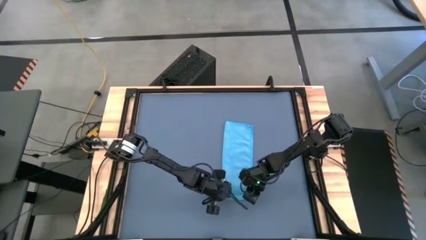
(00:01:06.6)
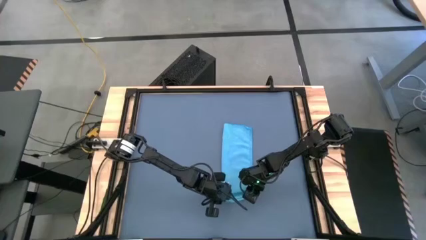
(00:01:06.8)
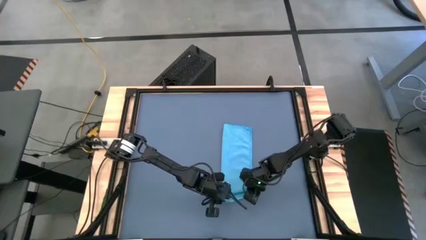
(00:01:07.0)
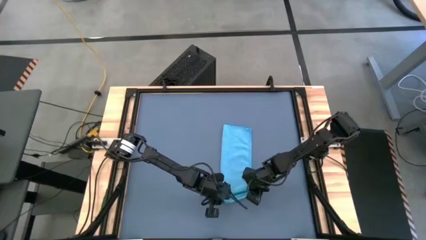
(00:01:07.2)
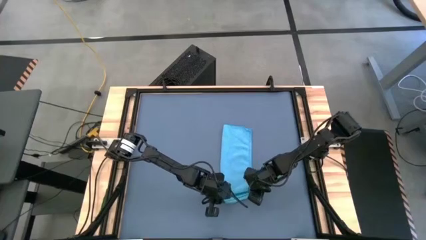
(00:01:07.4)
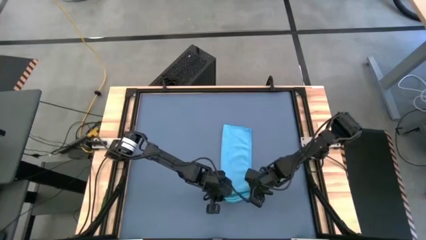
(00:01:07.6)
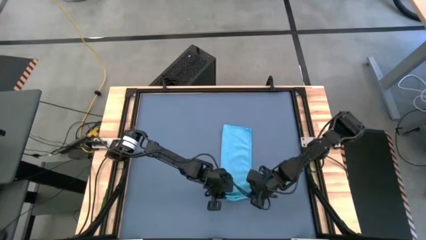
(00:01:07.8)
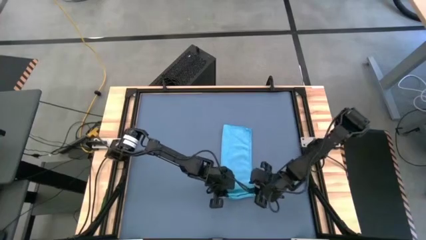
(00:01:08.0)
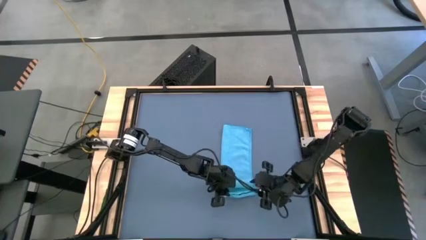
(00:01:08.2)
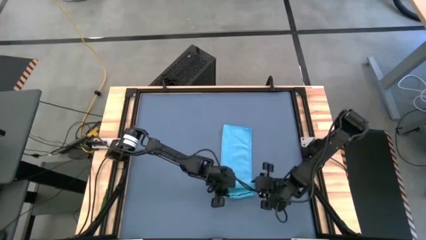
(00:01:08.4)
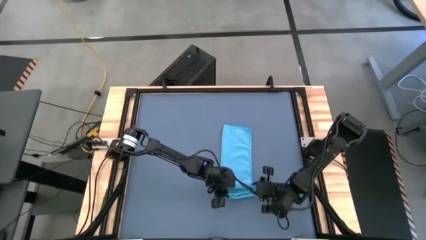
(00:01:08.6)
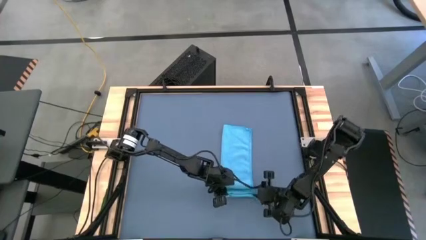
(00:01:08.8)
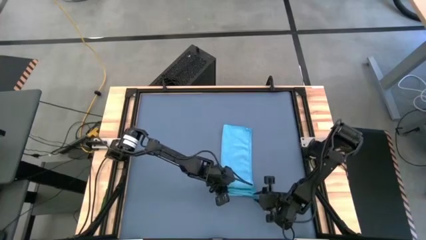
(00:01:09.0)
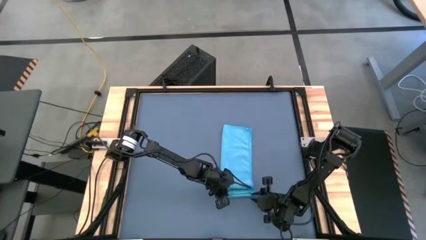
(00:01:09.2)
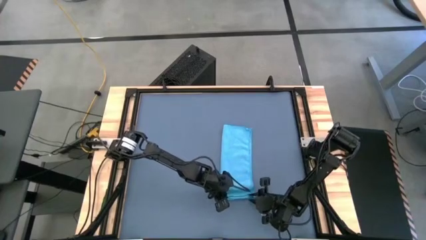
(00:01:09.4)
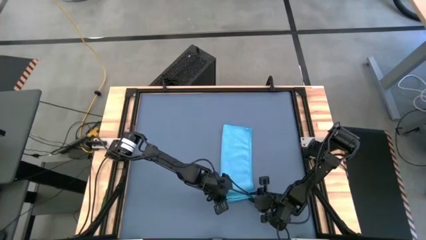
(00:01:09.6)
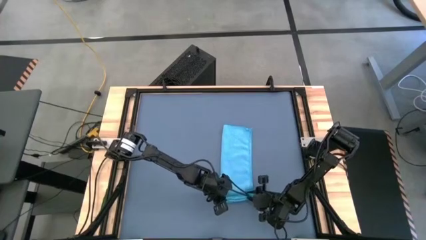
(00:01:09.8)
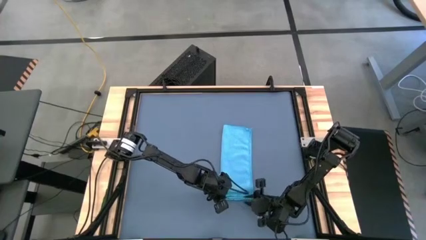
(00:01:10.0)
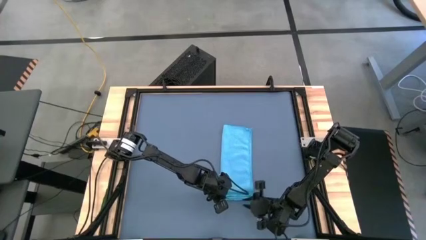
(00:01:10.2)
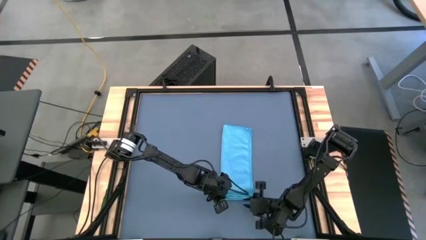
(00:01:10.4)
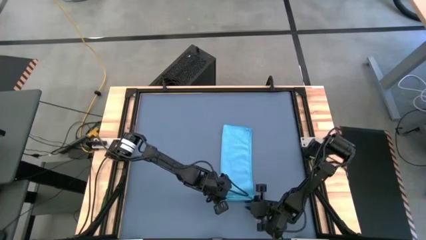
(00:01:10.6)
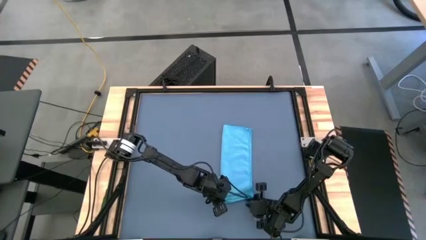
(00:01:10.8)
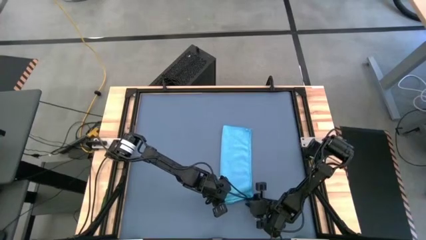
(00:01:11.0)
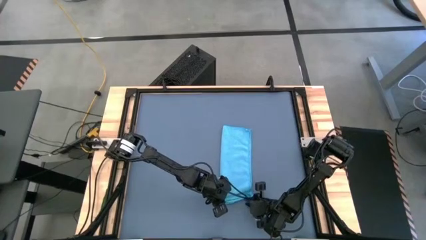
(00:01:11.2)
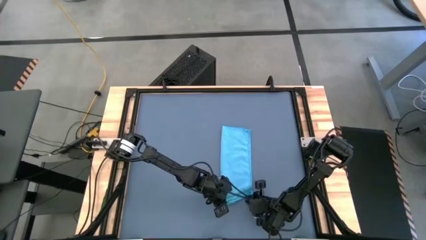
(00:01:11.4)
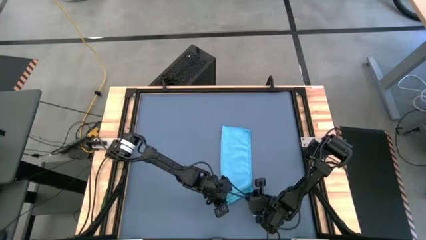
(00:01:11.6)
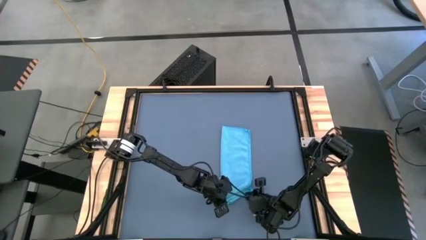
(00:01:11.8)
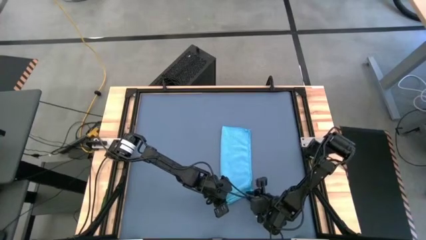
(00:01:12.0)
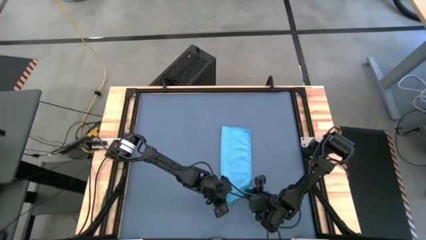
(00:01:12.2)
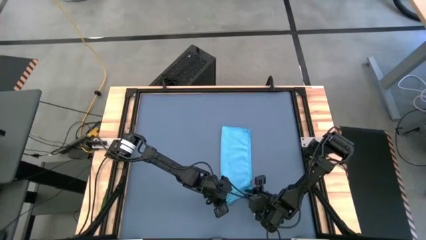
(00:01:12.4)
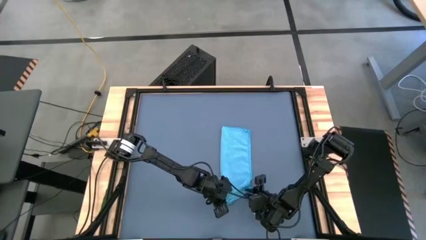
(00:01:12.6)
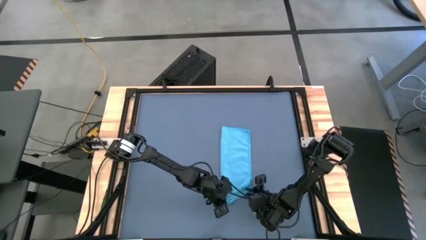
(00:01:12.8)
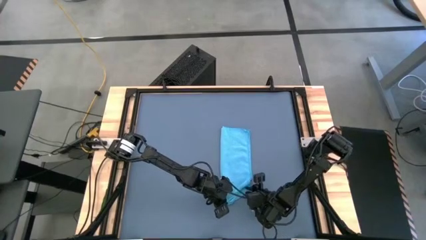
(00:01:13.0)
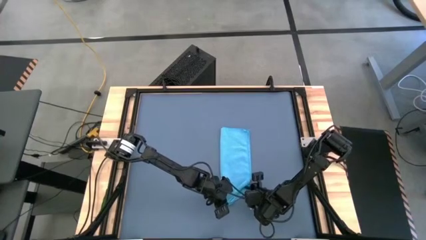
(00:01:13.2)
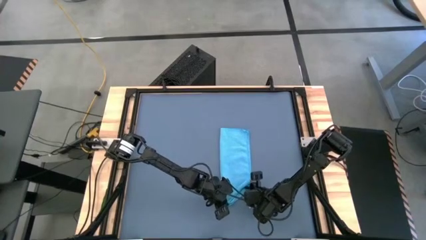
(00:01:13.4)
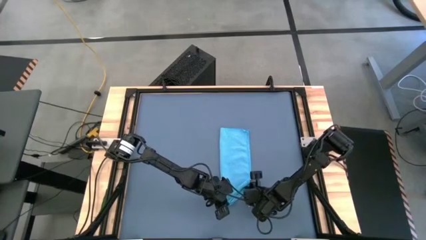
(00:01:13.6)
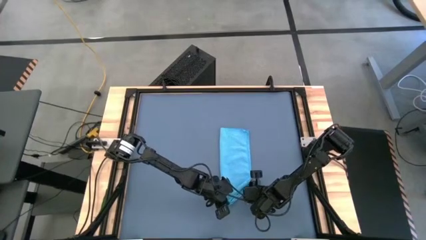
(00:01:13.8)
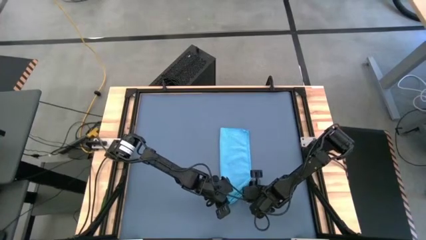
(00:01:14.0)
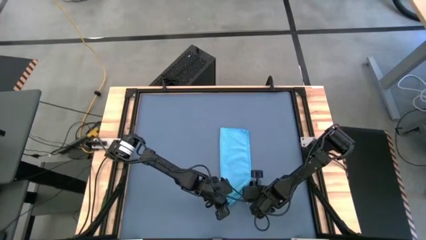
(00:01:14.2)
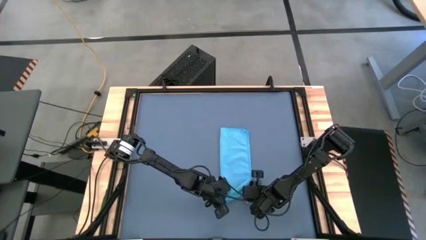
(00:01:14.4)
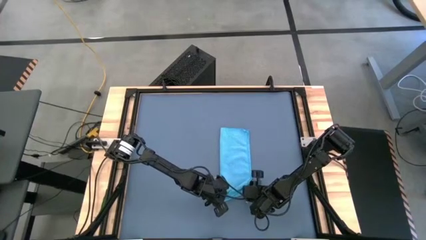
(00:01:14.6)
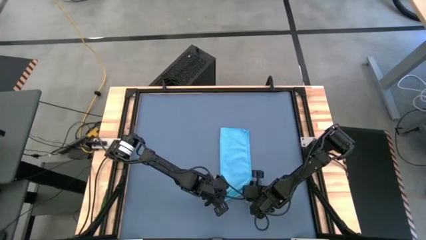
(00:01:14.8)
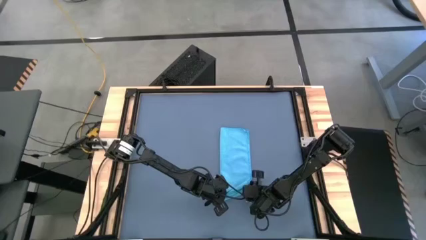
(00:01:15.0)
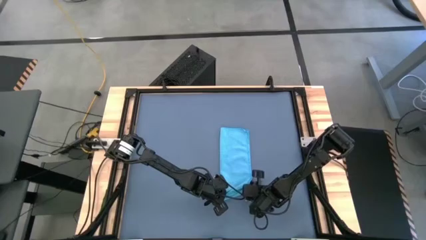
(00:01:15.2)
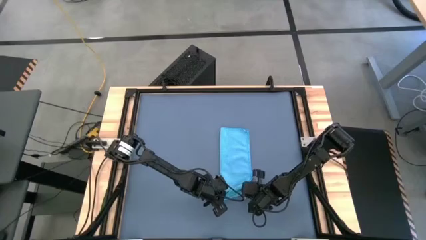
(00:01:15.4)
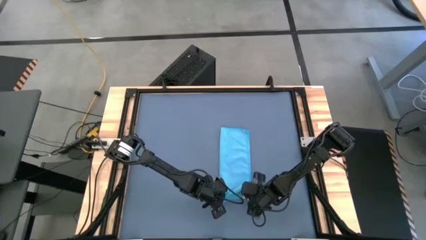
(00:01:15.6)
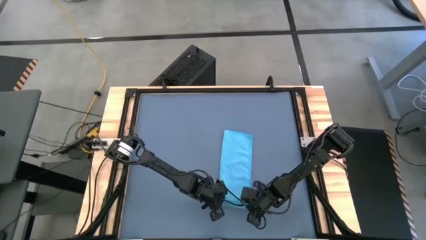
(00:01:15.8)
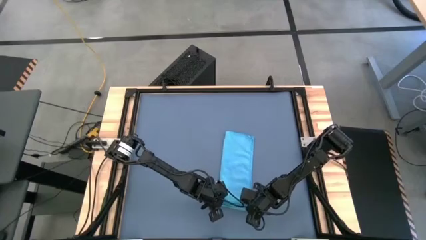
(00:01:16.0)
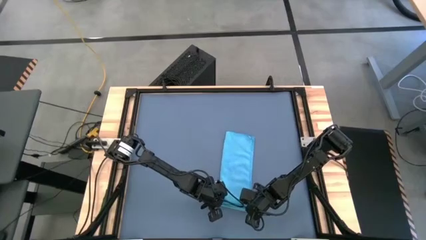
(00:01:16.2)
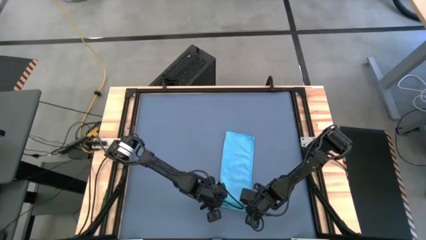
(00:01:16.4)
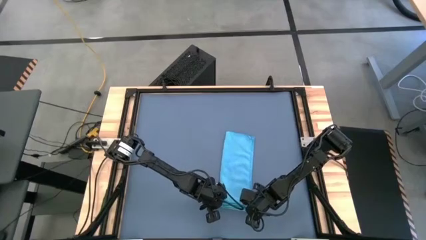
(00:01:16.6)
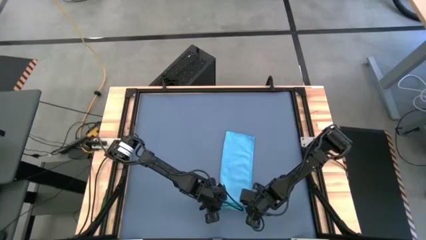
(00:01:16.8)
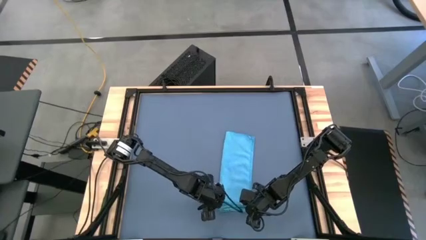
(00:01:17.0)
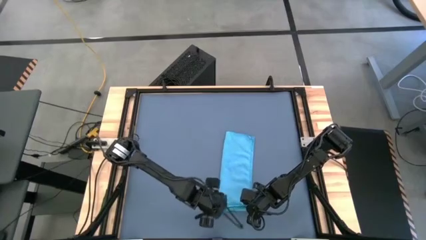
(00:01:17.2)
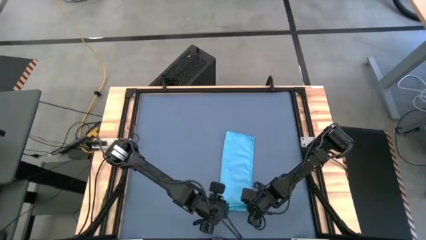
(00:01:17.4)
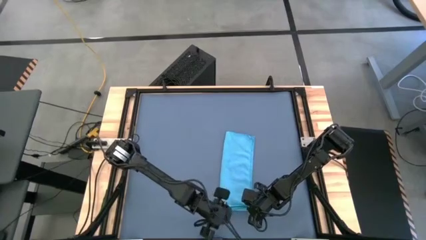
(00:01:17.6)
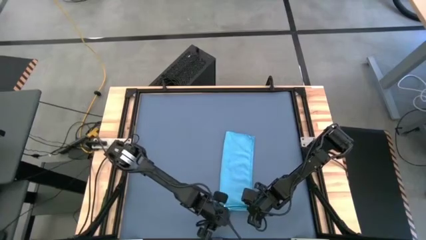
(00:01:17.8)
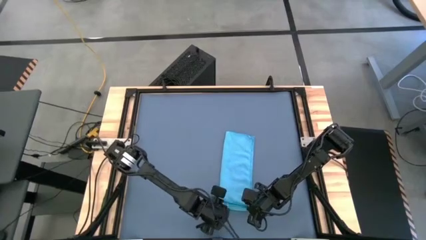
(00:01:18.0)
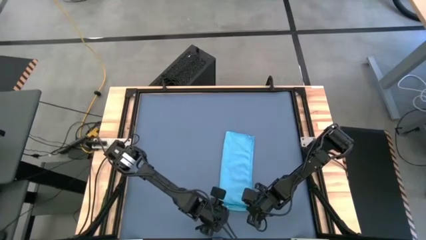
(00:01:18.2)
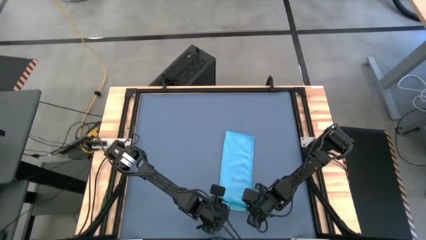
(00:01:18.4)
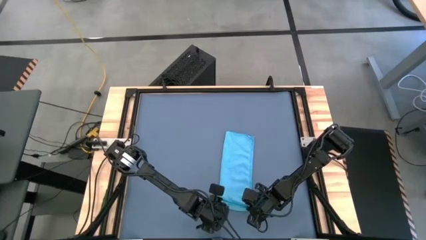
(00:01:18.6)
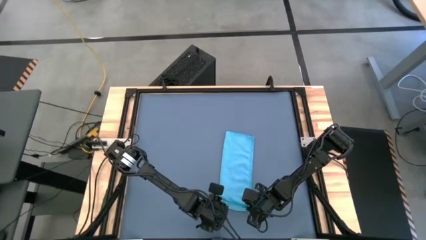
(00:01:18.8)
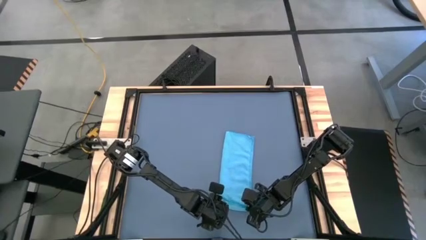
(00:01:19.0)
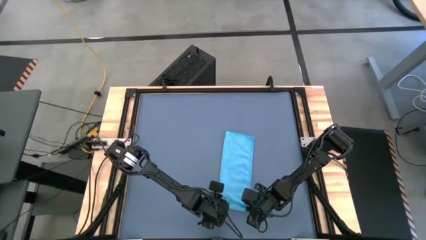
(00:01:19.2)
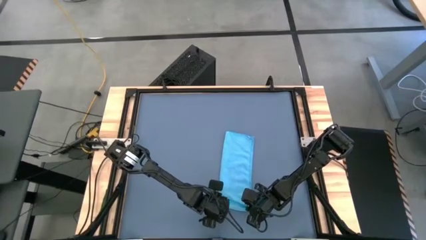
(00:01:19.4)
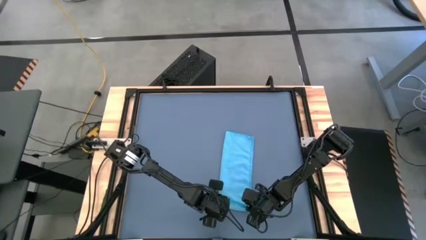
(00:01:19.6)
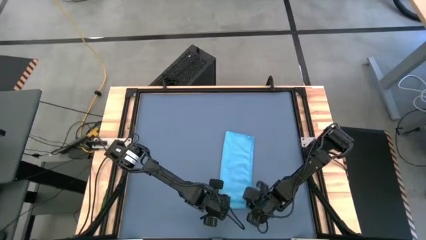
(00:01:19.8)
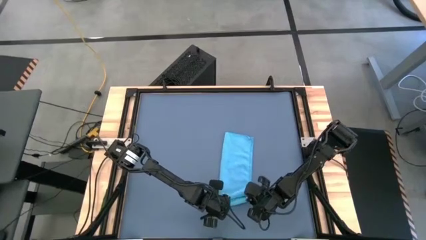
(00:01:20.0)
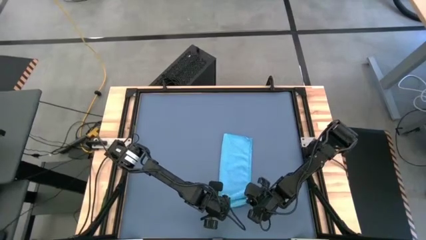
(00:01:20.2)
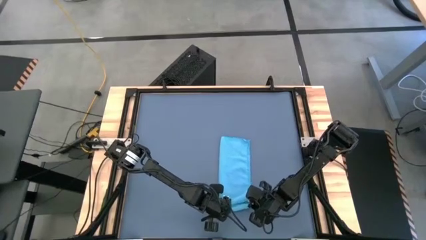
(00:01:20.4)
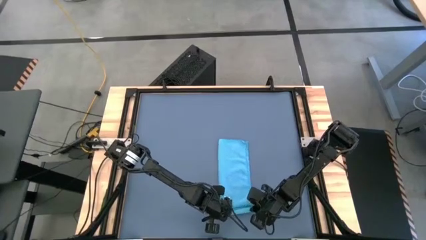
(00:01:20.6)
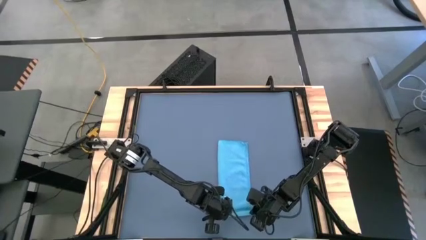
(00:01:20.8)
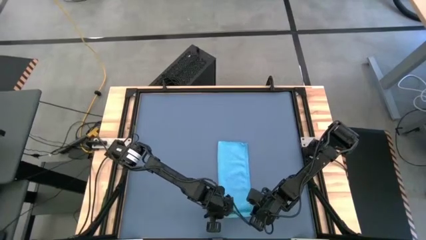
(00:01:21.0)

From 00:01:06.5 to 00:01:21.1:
Task: Roll towel
Roll the blue microfiber towel
